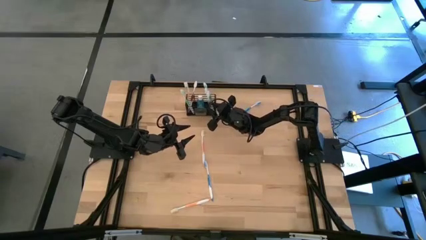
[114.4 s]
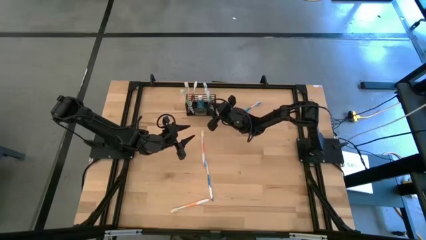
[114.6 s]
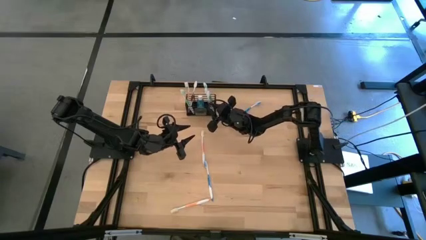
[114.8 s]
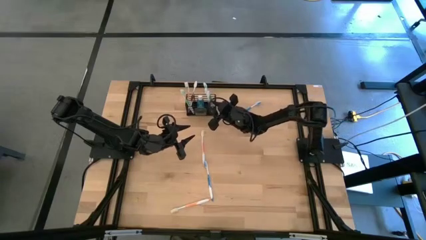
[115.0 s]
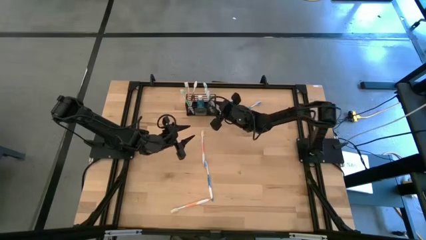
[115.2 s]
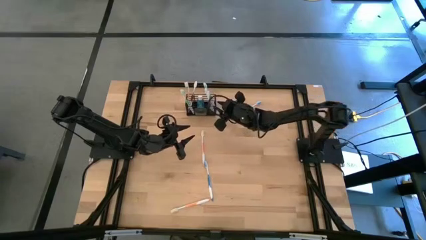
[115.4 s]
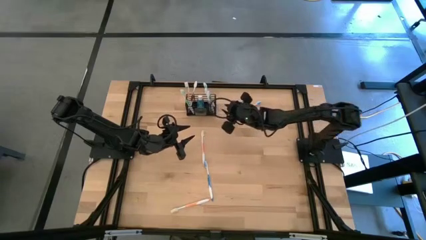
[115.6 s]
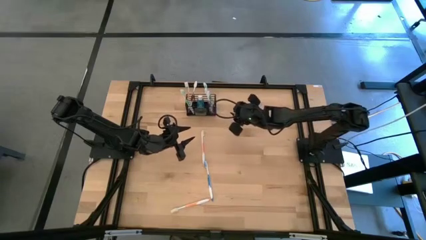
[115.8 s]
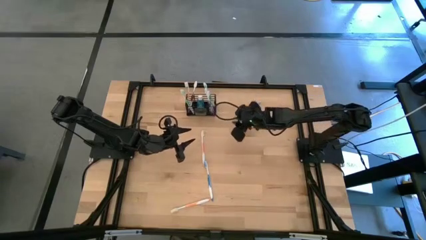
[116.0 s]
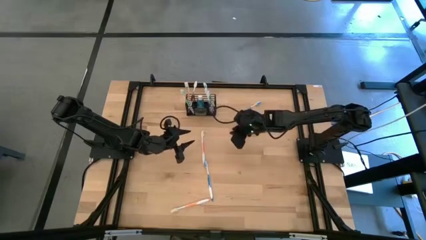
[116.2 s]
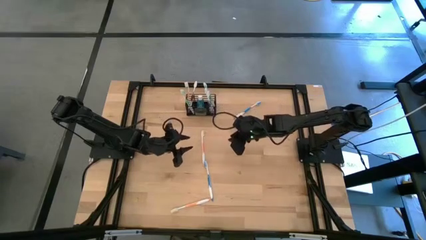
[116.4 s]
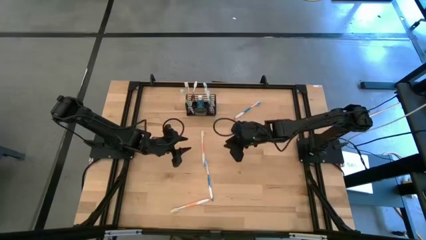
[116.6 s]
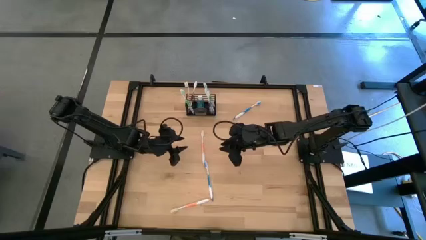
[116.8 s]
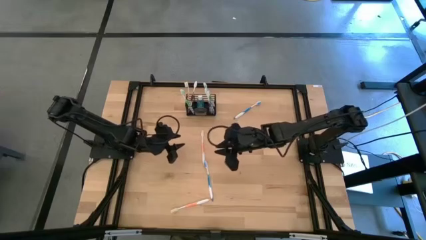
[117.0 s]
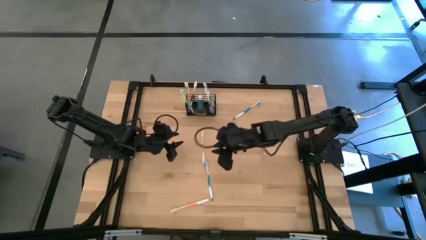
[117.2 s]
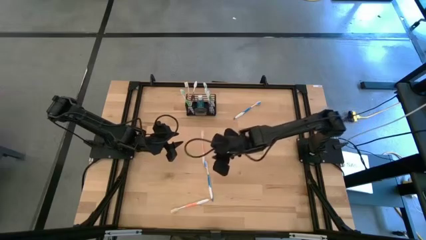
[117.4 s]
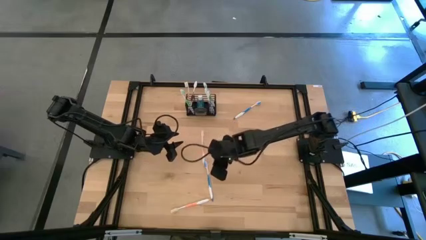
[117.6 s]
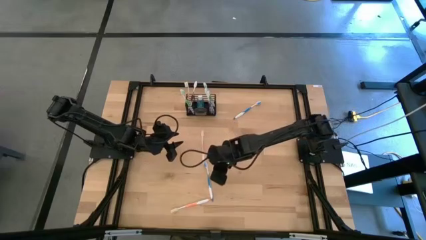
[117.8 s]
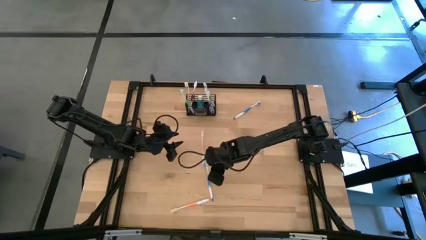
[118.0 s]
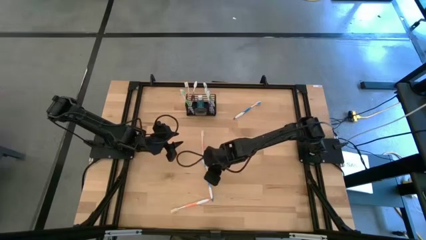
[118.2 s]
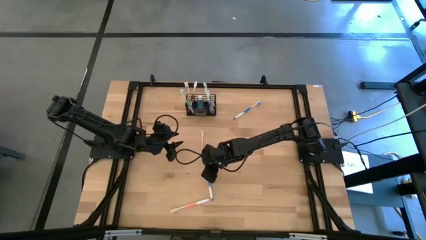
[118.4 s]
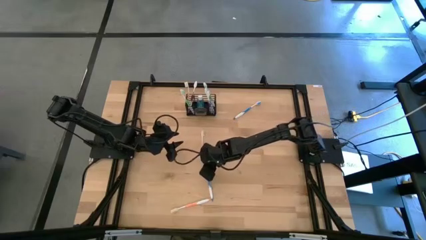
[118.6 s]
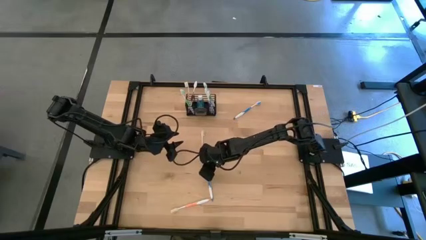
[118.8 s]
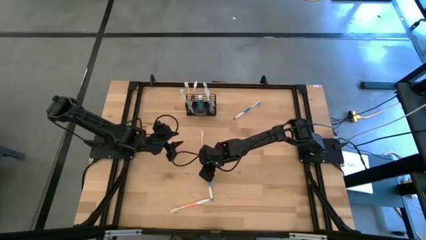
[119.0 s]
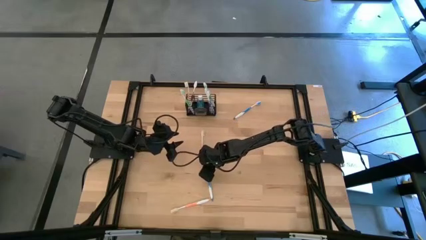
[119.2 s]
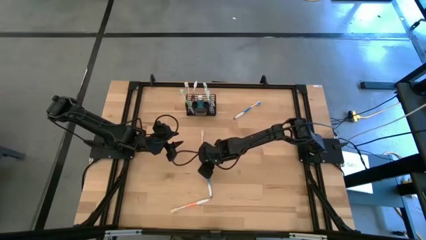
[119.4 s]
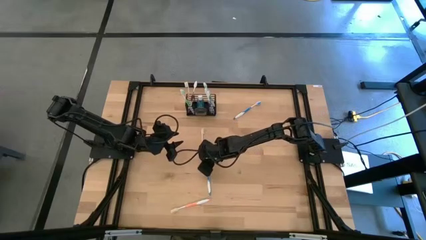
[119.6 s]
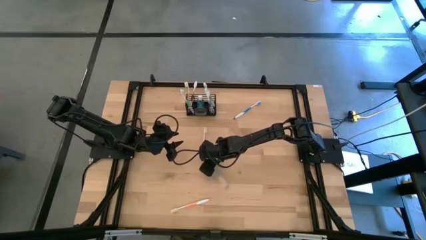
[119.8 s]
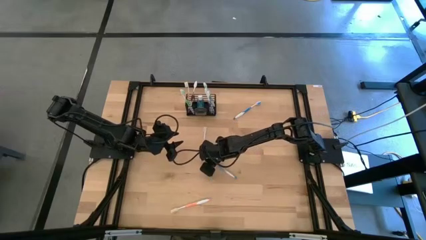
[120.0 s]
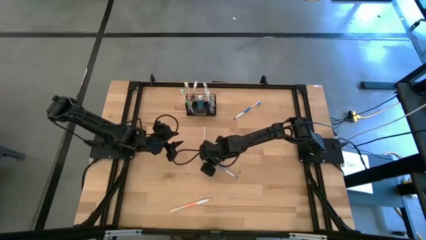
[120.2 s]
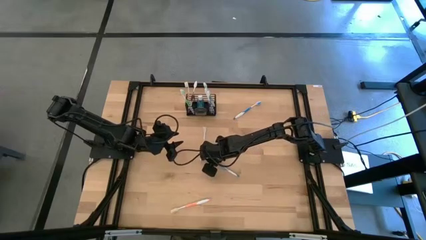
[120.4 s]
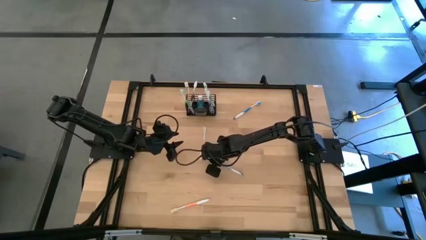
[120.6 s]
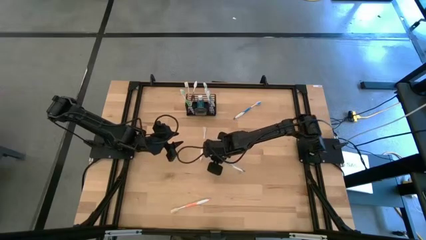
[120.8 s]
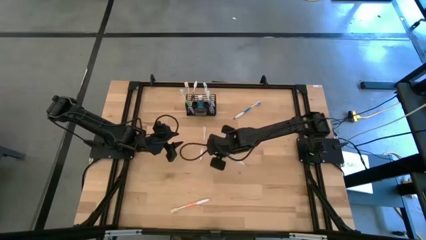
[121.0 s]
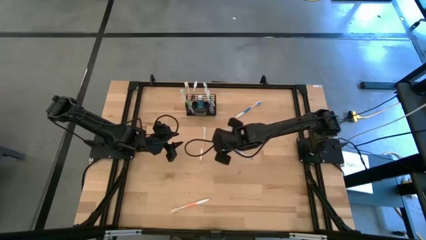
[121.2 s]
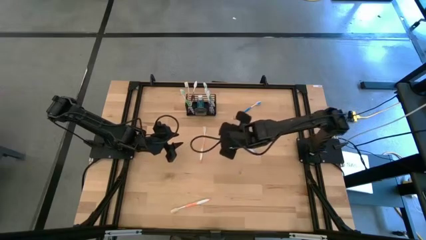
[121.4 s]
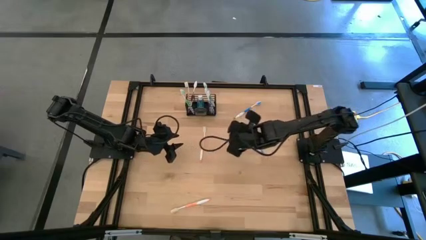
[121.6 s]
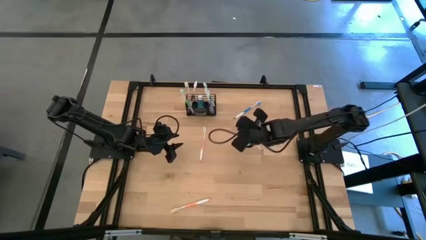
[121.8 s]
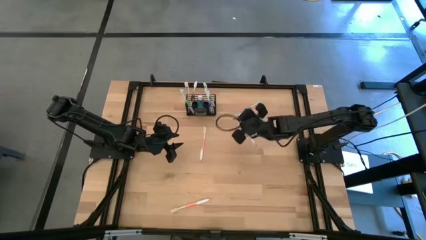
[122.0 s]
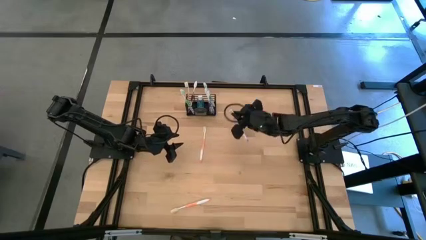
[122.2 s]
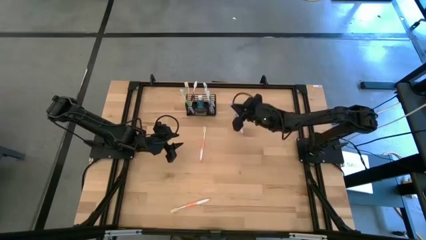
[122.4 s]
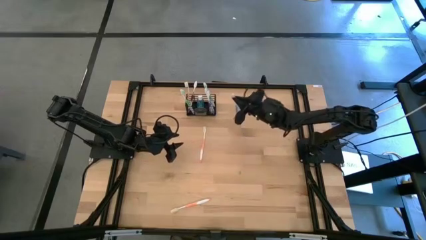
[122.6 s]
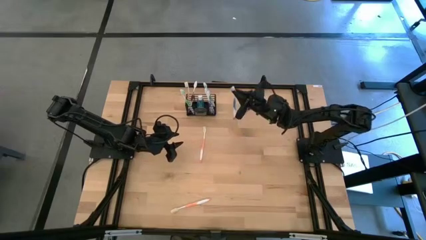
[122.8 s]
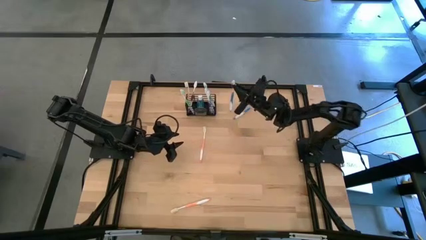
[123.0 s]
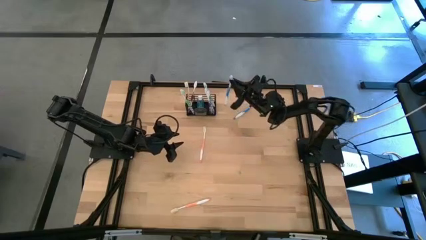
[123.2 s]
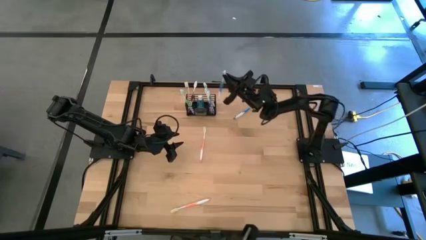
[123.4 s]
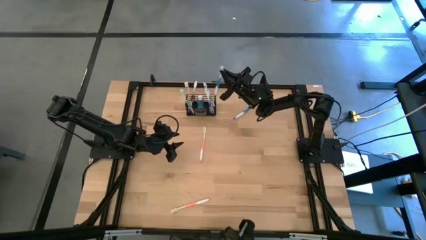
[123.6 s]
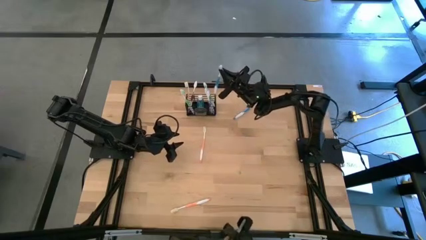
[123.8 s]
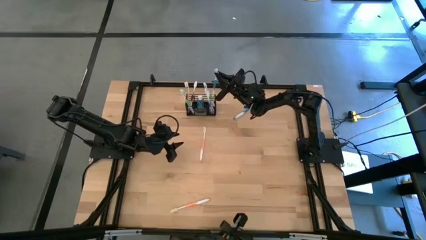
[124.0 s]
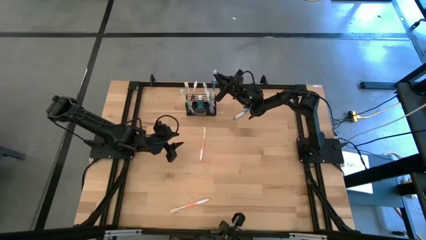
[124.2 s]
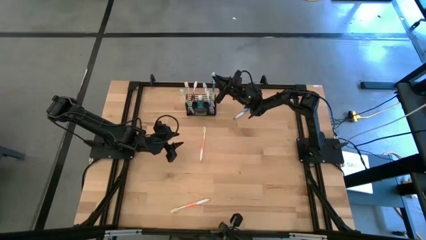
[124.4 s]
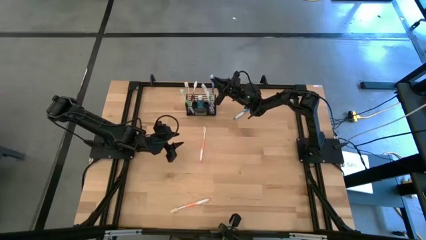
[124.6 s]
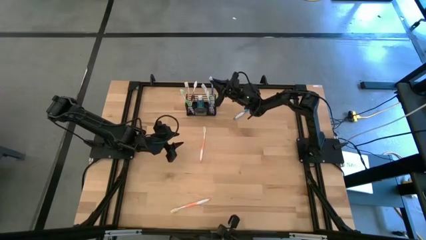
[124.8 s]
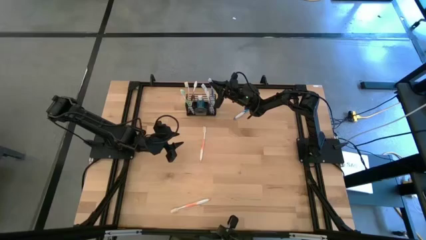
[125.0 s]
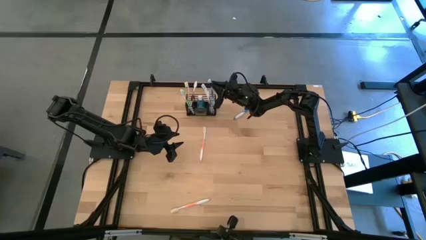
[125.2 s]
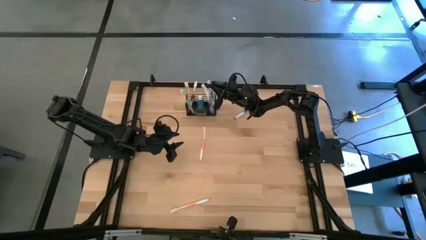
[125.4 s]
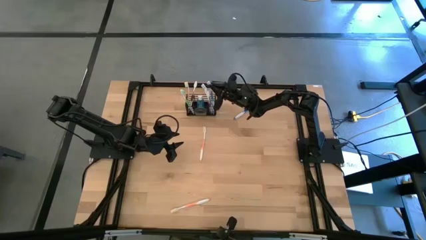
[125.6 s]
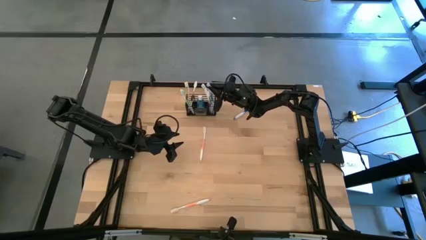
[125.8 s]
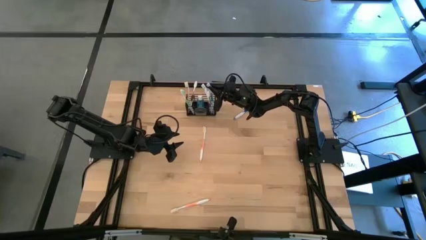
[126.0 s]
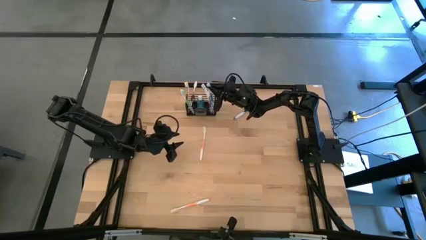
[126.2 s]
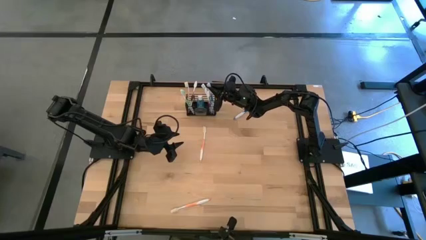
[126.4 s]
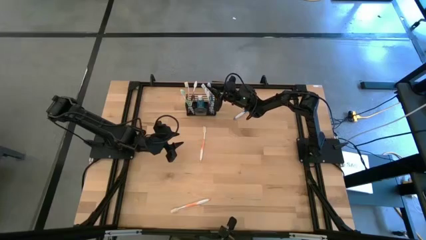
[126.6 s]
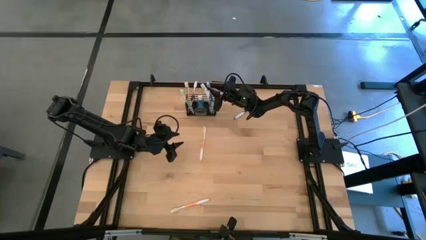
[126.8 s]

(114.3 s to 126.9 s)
Task: Pick & Place toothbrushing station
Put the bottom blue toothbrush into the black wire organizer
